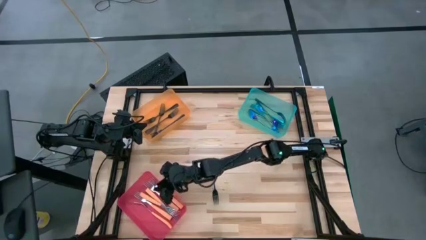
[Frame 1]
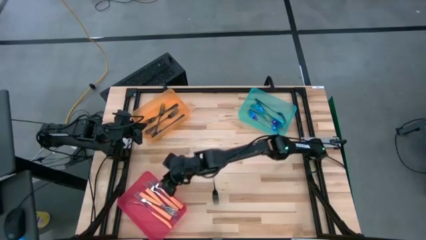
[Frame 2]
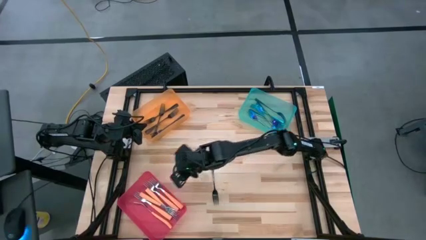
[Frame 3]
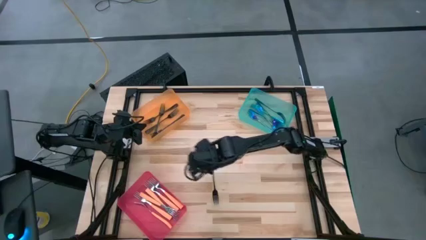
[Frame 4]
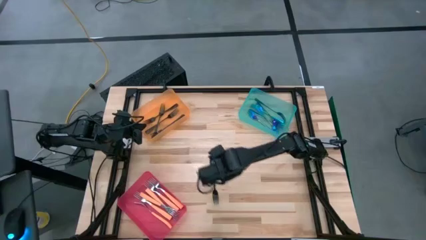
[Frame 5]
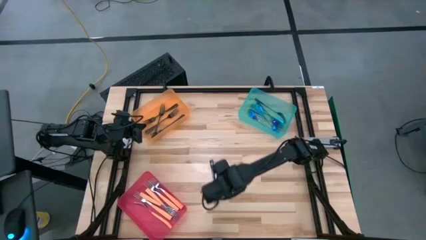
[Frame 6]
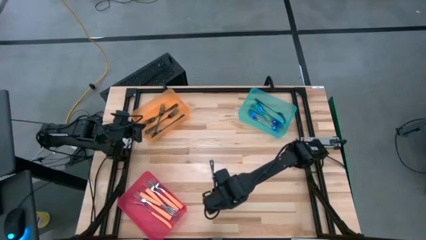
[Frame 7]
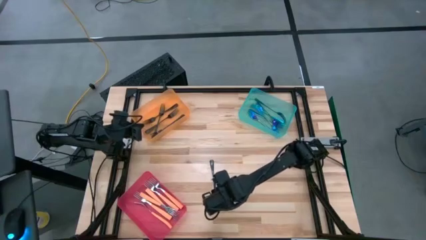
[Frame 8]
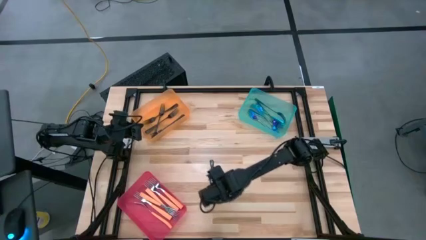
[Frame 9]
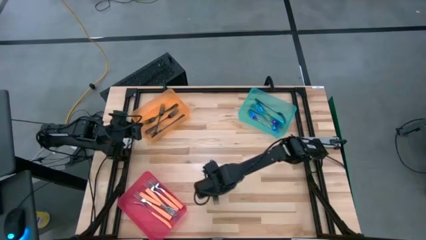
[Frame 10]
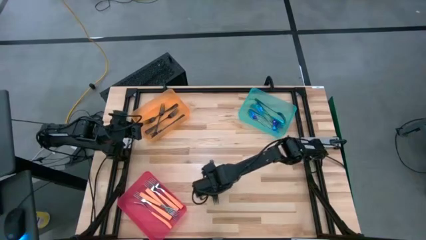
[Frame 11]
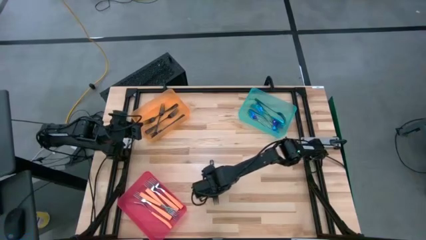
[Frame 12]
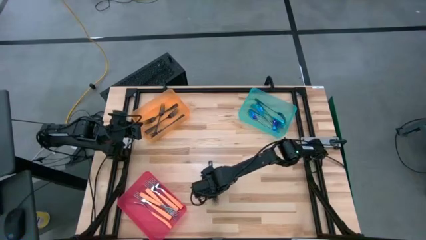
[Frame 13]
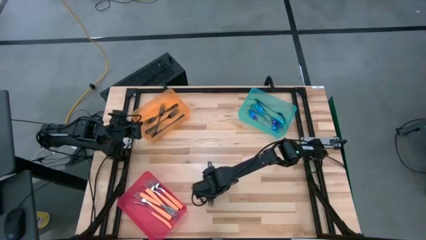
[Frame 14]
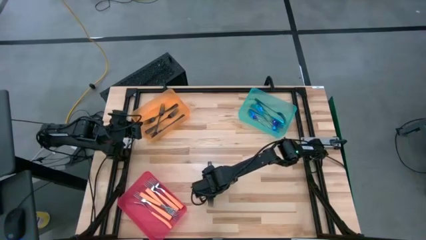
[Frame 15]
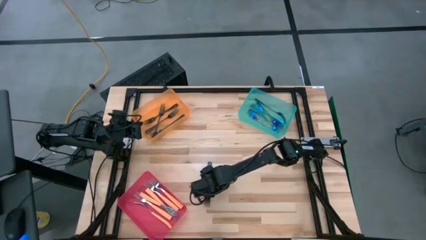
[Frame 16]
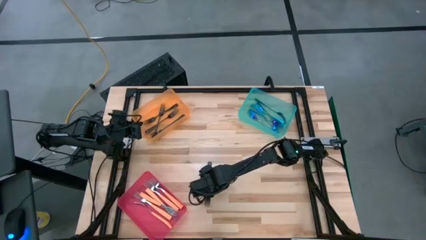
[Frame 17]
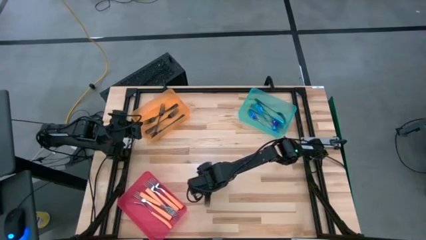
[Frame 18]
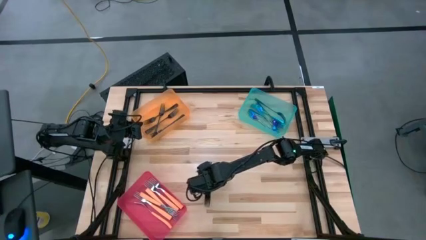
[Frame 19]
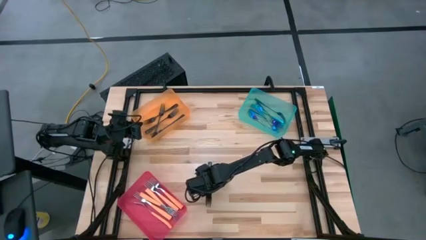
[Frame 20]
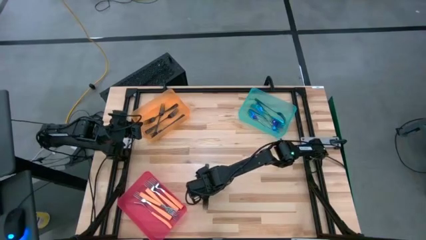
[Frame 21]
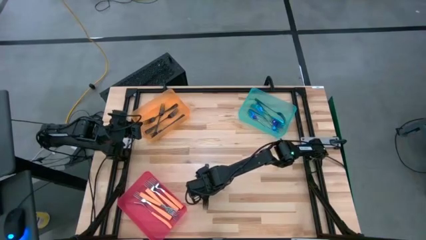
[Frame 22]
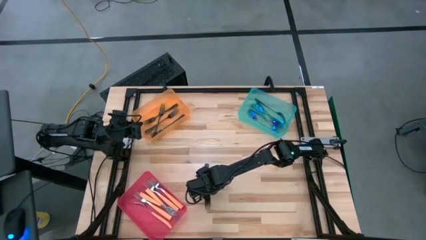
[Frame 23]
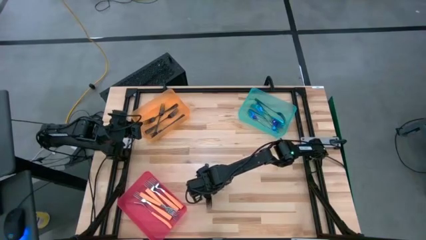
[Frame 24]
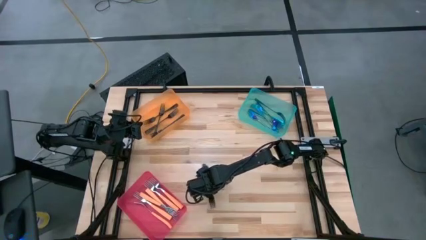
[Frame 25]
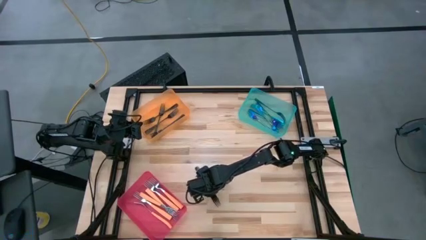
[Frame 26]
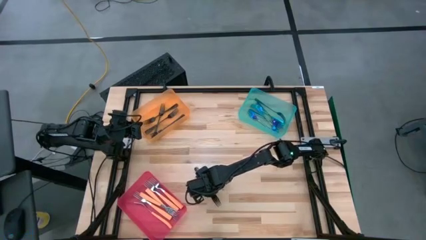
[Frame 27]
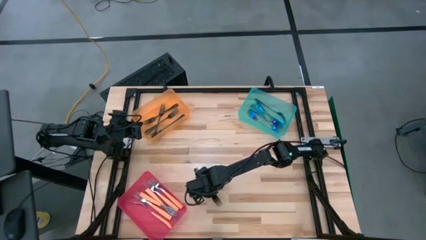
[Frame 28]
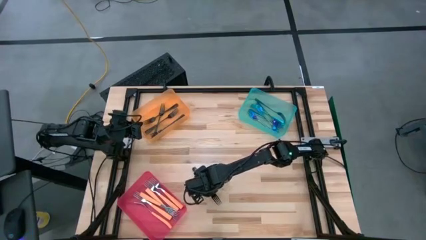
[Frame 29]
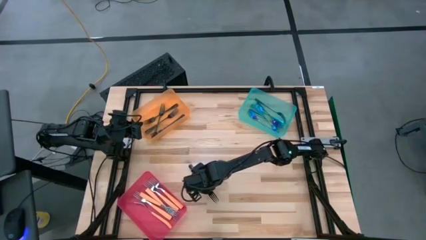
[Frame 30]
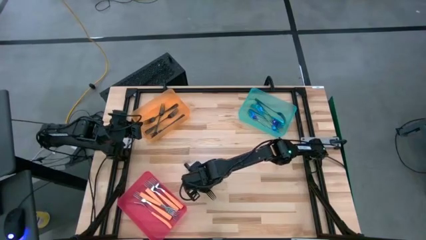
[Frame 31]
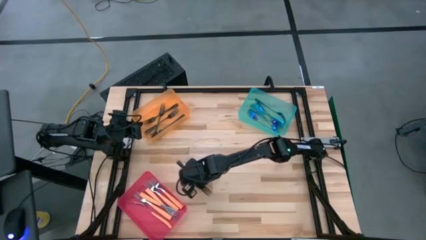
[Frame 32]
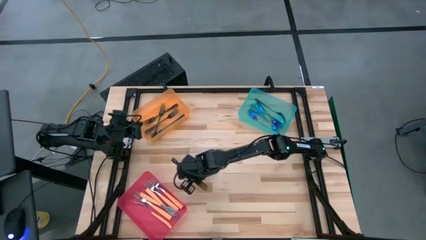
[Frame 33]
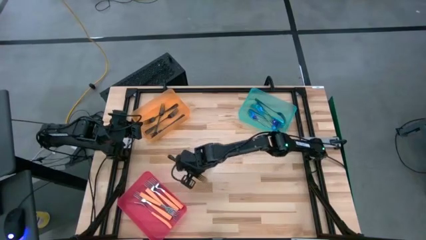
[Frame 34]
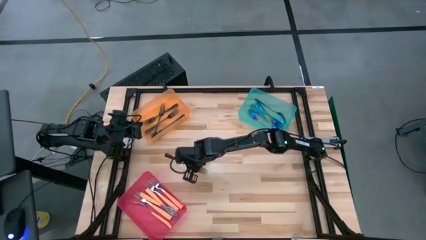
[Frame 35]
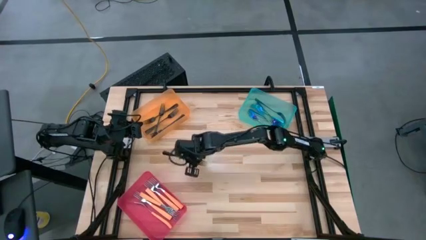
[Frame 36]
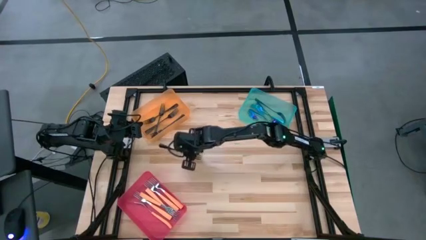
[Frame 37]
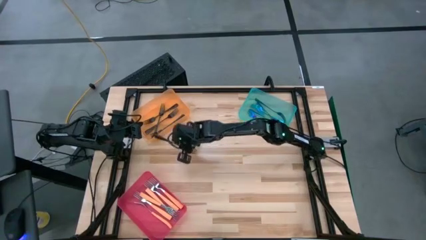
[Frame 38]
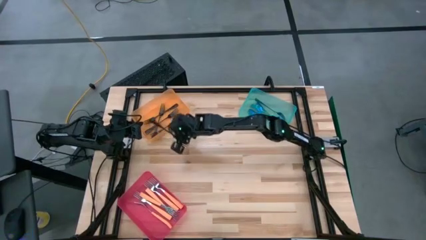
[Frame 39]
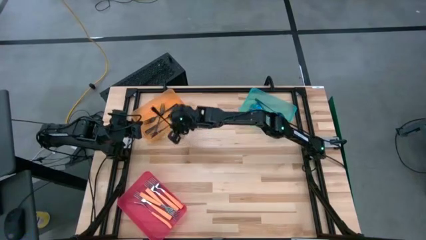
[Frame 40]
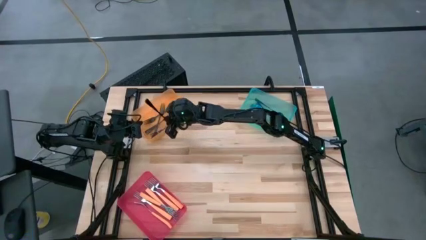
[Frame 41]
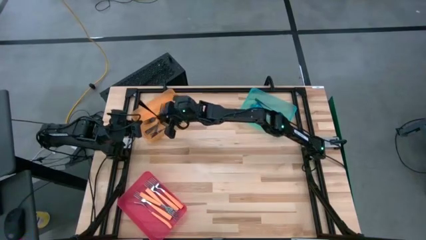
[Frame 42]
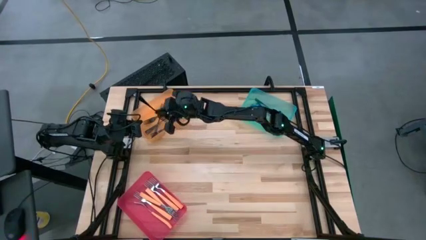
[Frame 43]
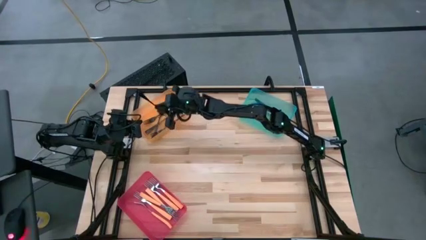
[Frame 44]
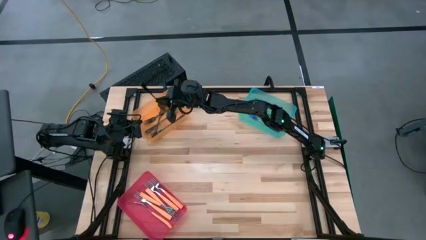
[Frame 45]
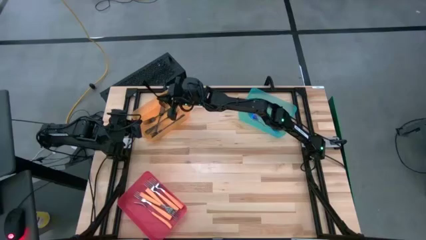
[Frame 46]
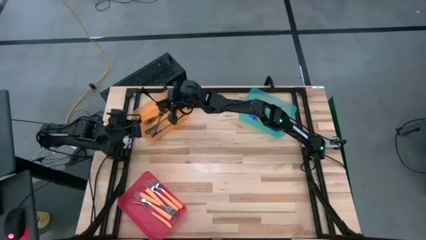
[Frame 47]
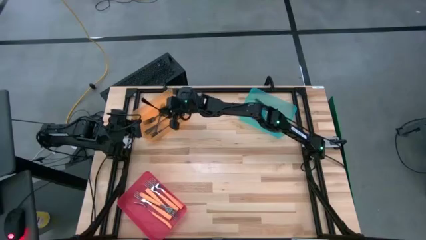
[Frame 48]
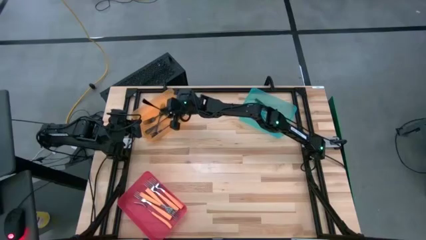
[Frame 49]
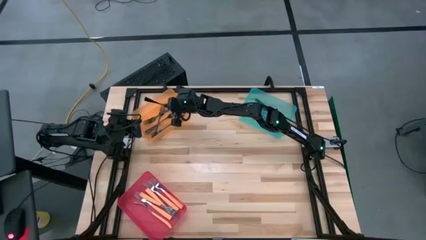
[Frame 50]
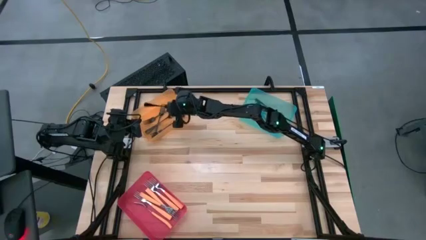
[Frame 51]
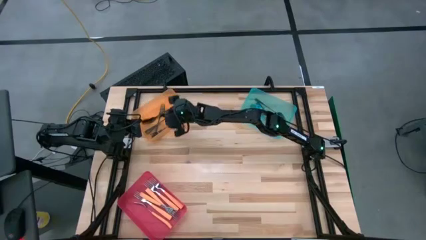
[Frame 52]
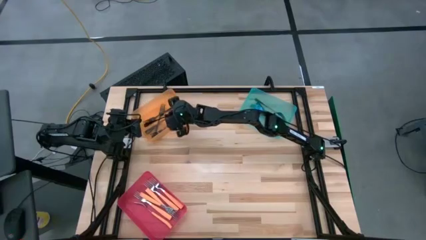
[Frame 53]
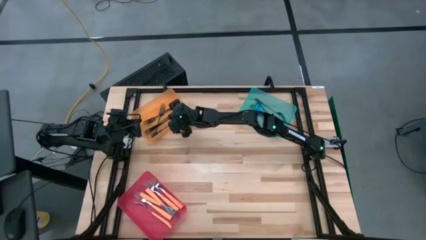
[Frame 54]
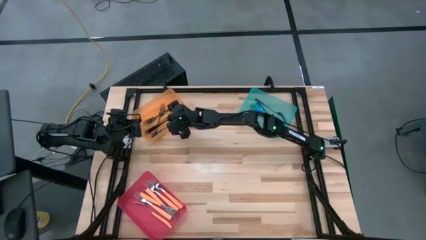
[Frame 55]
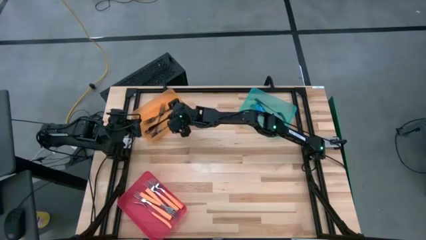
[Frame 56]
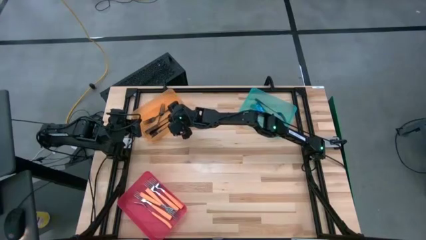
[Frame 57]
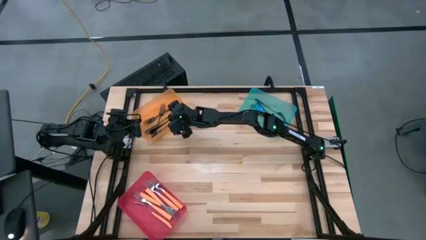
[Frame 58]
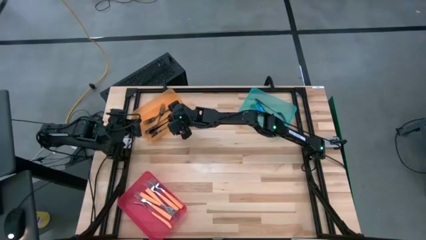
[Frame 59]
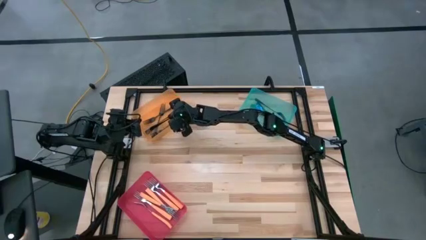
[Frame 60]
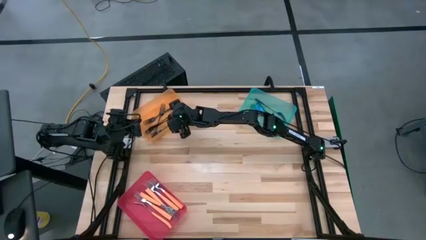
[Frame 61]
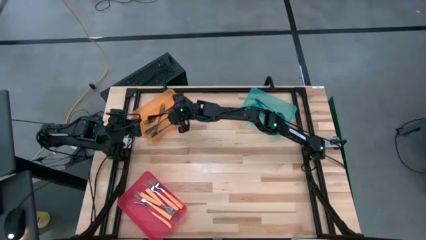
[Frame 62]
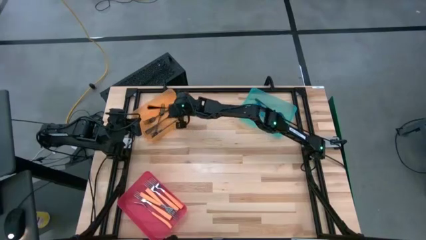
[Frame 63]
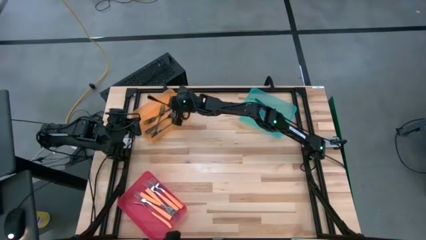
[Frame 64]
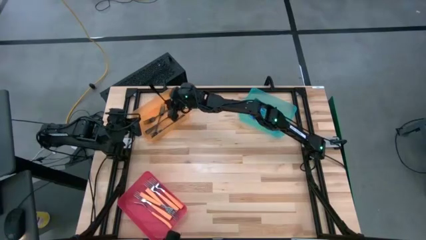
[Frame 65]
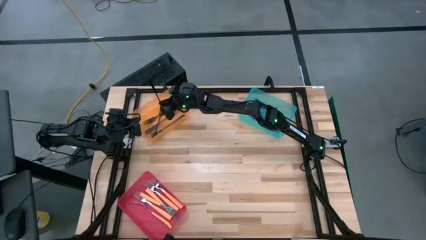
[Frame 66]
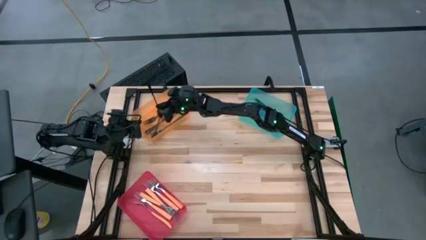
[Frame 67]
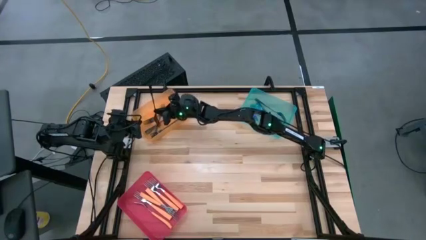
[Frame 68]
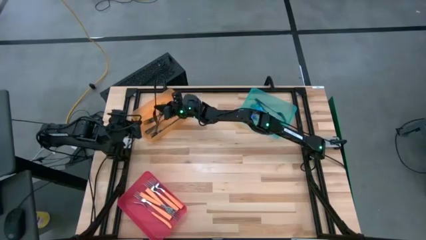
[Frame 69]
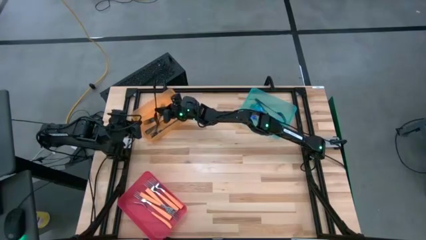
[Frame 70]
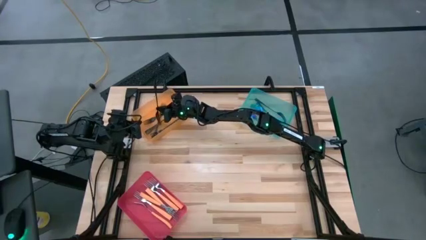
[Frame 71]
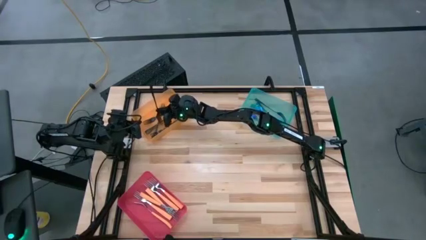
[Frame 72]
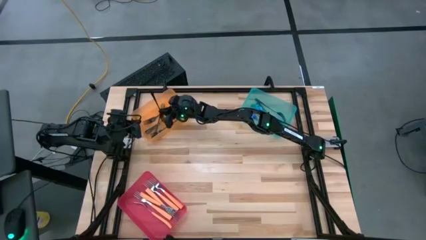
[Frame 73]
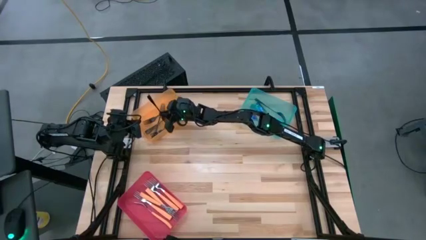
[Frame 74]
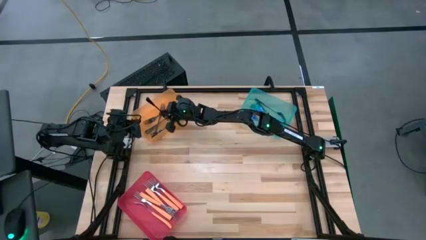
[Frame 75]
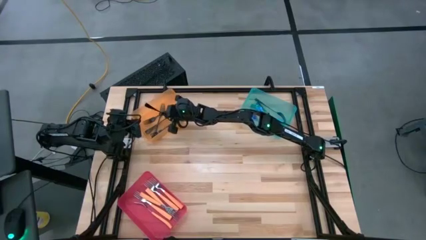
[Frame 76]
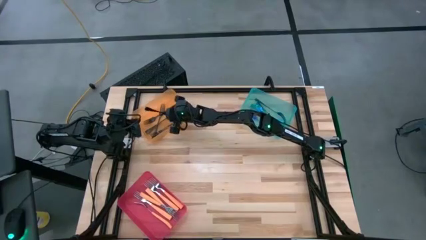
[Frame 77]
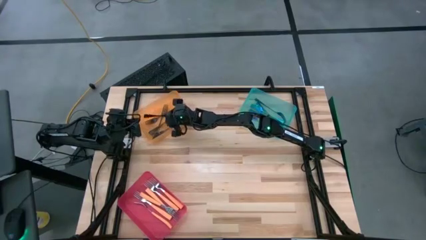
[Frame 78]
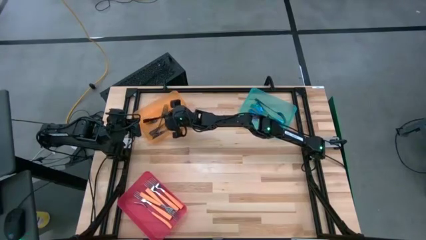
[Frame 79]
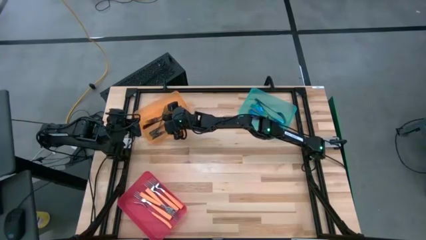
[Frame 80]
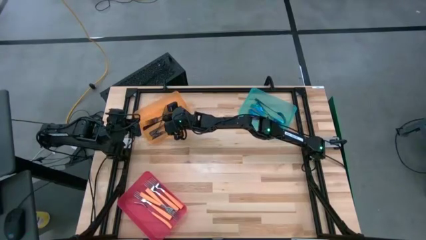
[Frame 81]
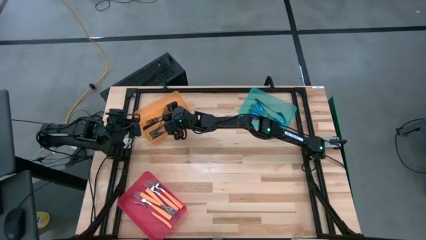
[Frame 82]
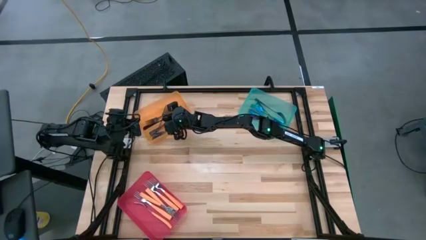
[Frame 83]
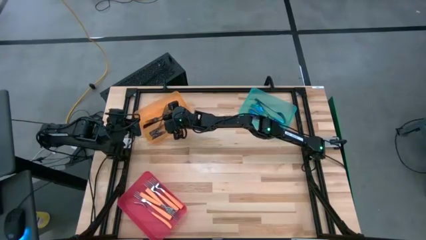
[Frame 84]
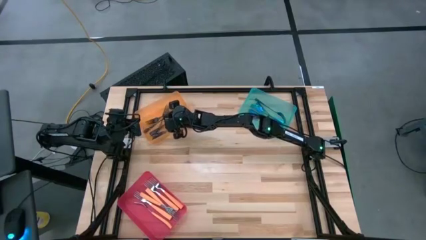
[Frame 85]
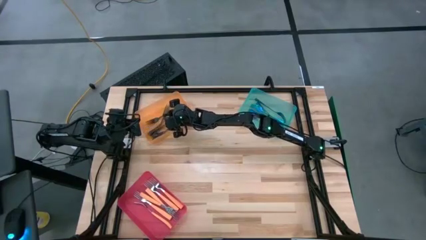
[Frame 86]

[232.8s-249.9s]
Task: Sort silverware by color (type)
Put the black fork into the orange bin
